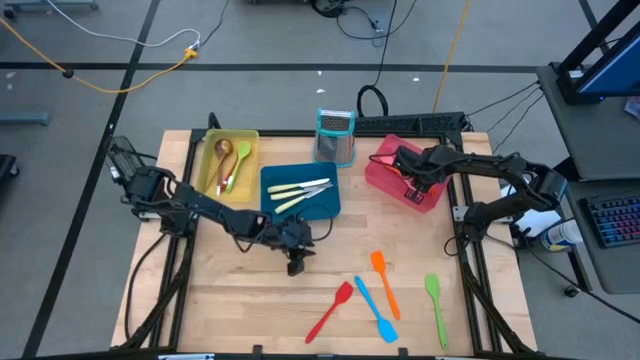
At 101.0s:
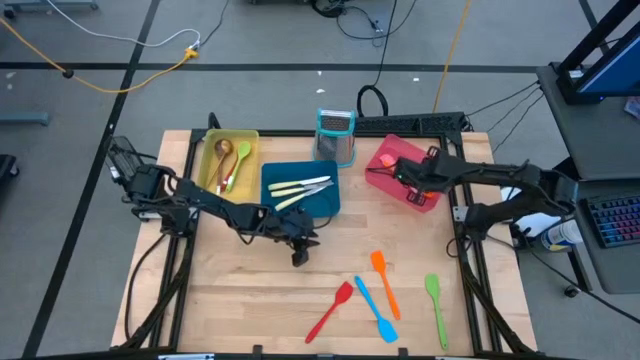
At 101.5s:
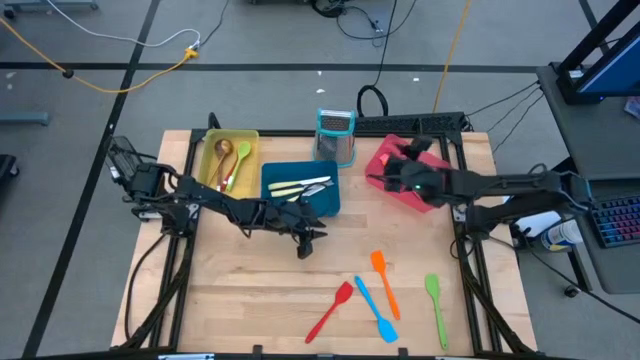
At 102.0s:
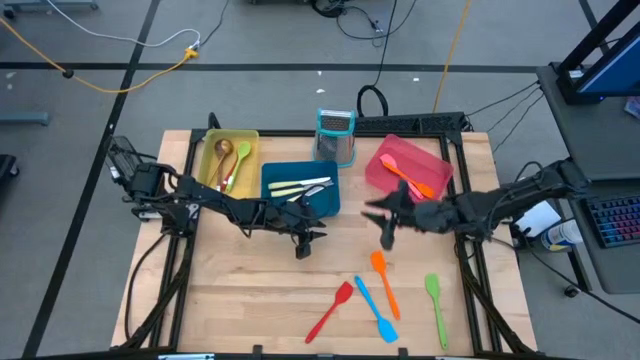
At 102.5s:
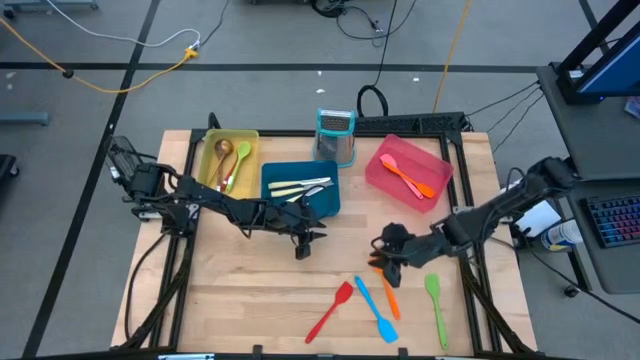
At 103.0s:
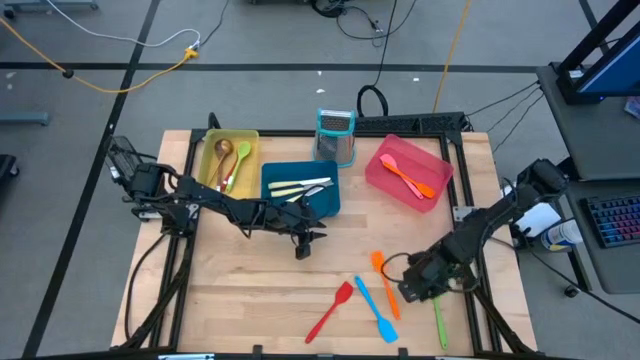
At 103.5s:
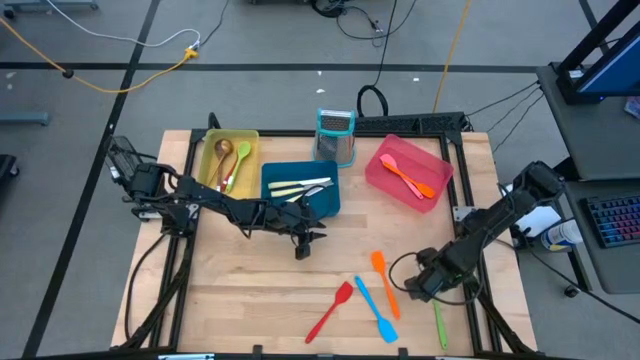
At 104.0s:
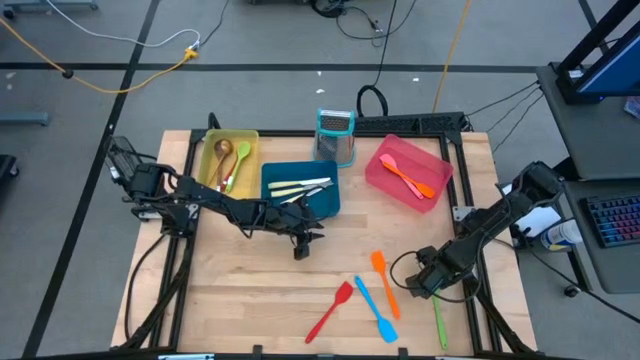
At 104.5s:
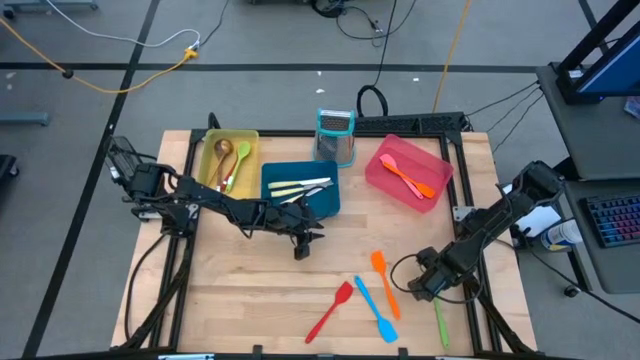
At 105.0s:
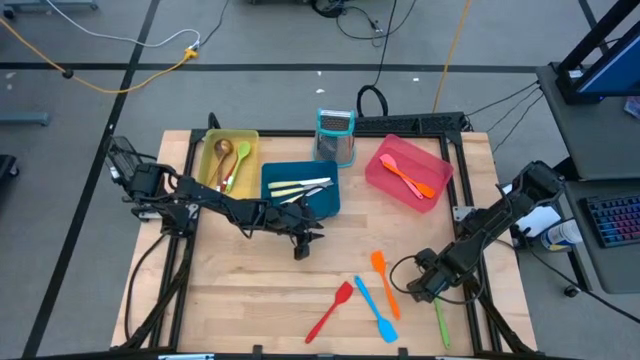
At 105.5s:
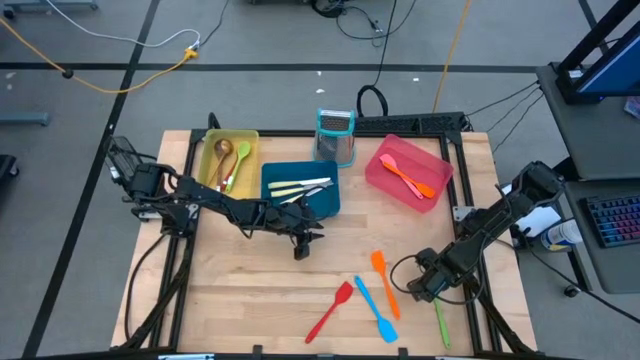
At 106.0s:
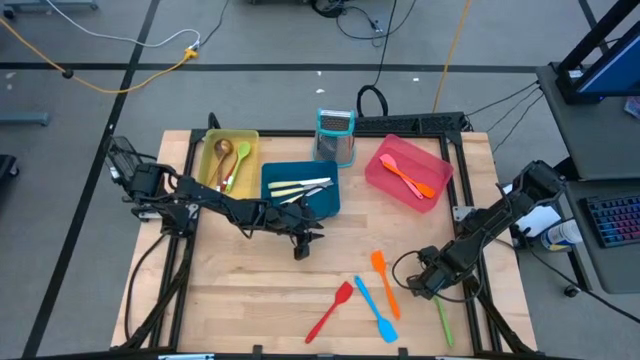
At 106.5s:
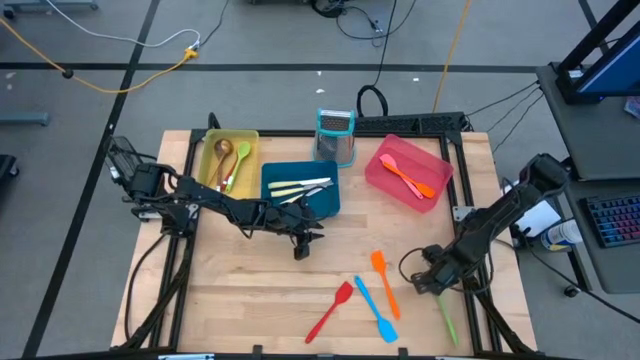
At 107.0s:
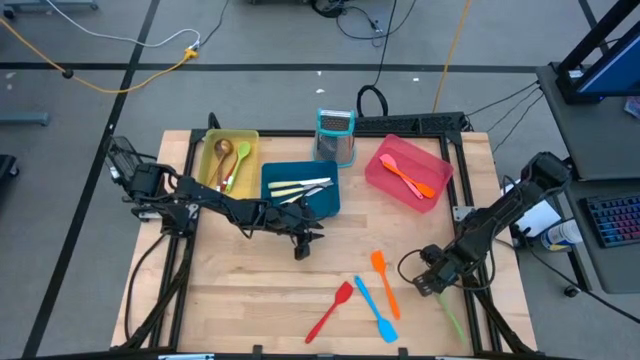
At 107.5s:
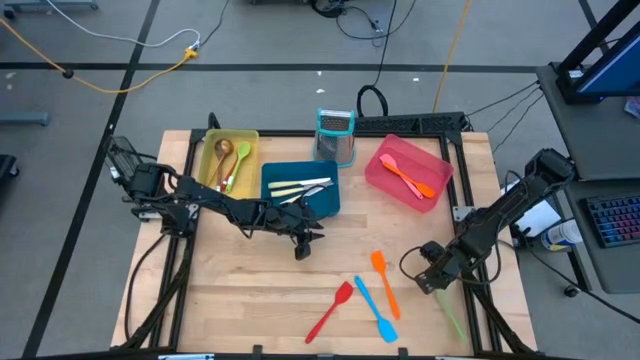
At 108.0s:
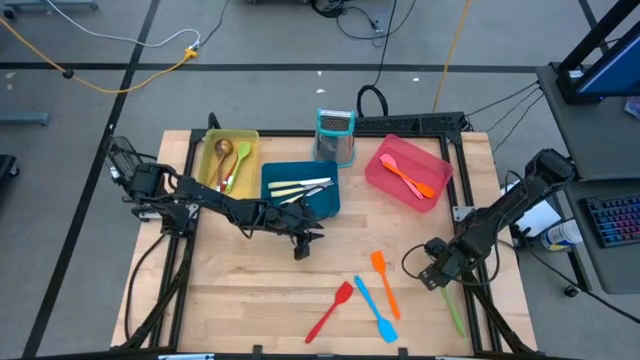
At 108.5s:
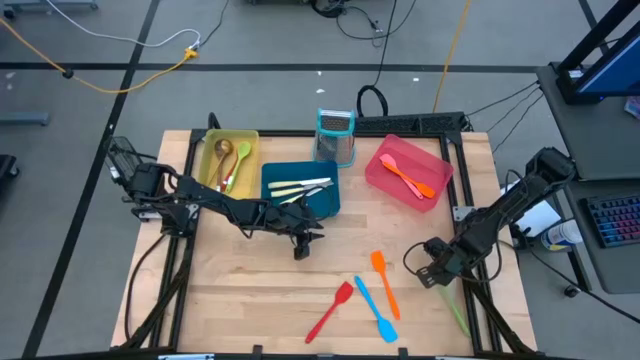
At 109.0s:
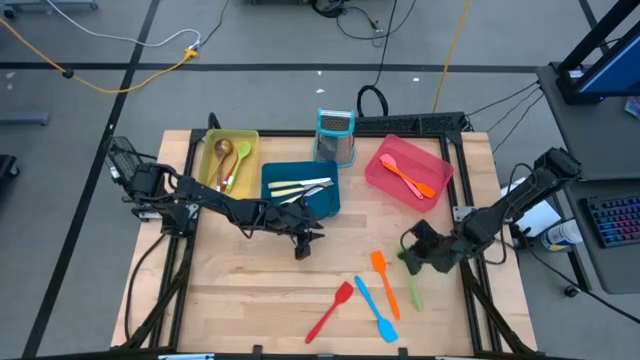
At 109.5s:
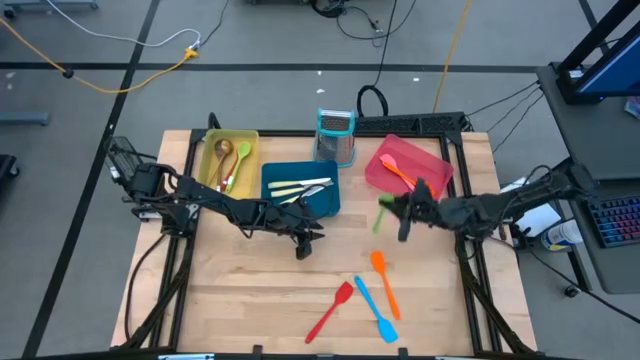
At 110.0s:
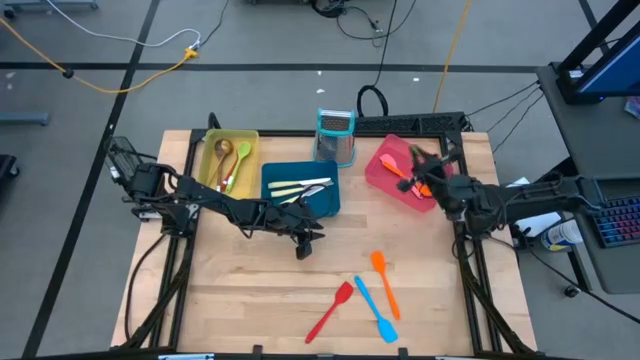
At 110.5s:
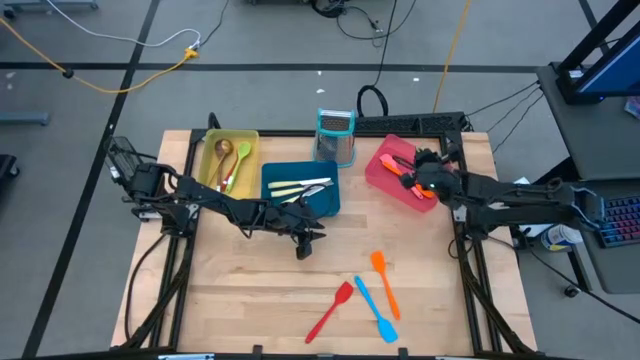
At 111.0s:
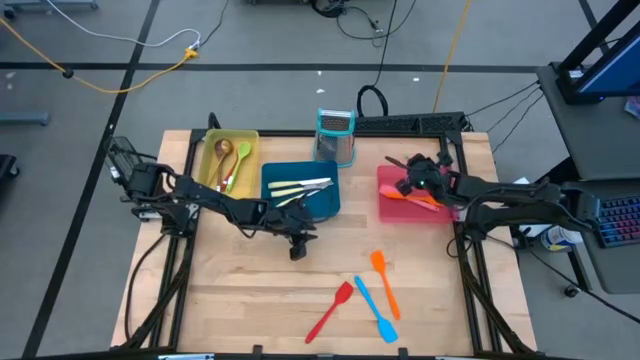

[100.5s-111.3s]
Task: Pick & Place Kitchen Items
Put the green spatula into the red bin

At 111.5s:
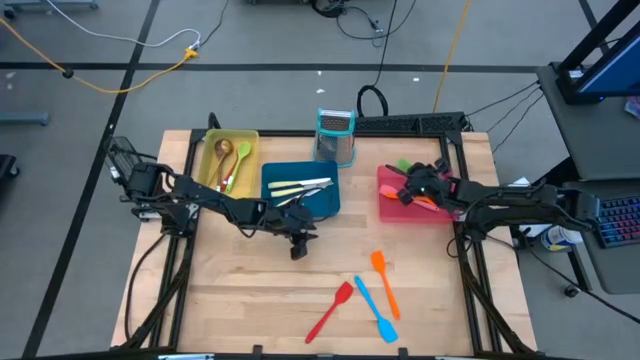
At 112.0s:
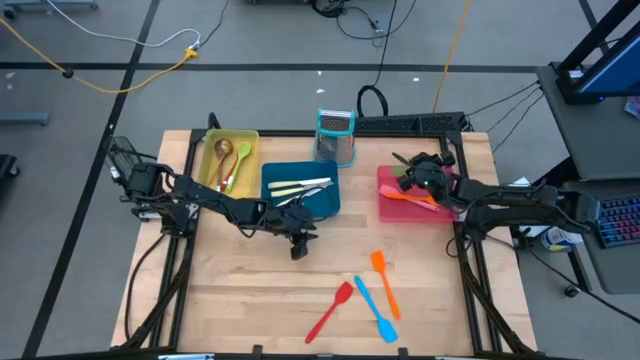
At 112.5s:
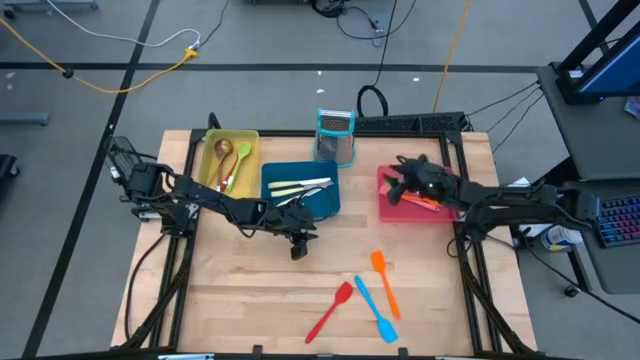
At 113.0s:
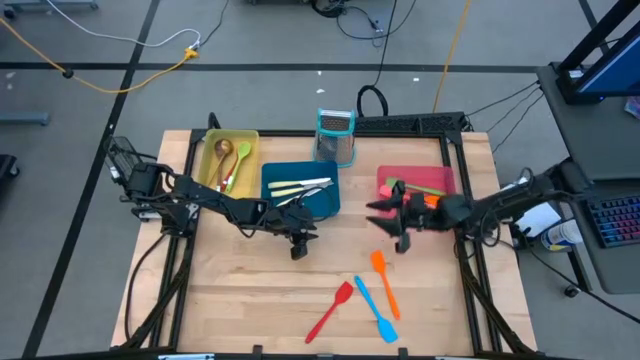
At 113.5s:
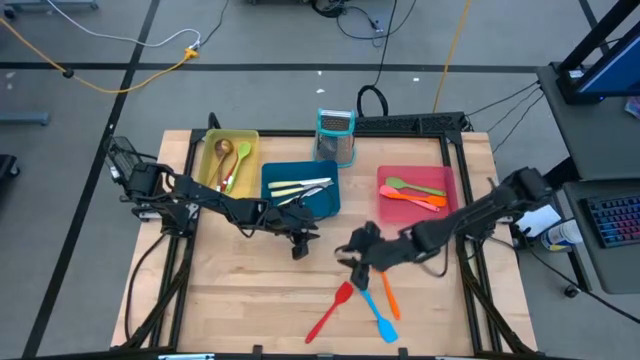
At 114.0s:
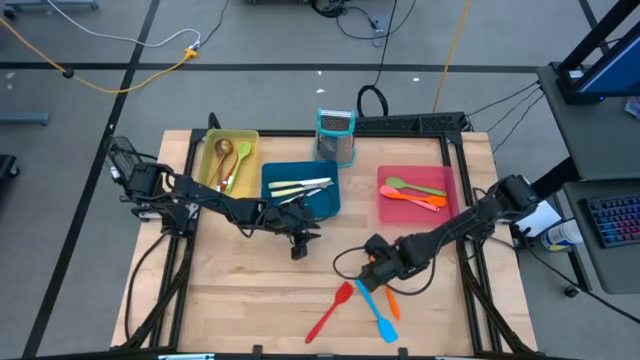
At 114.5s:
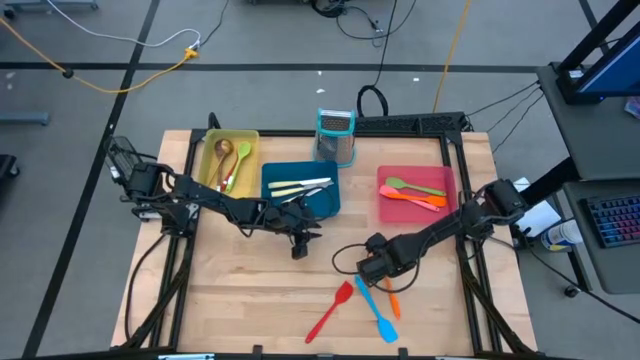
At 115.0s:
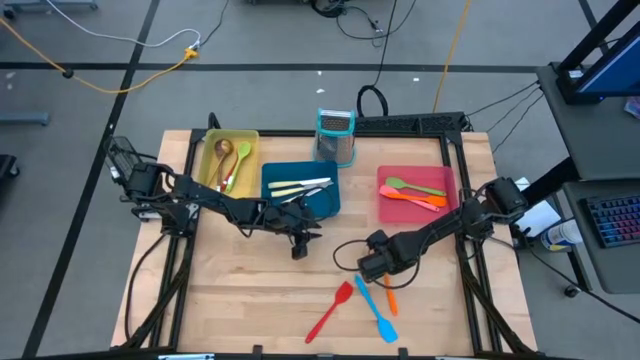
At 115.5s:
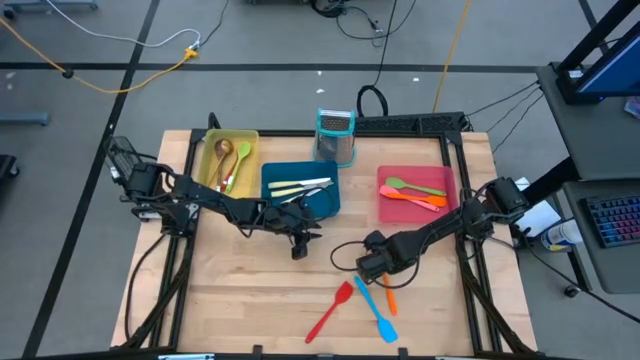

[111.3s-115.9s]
Put the orange spatula into the red bin

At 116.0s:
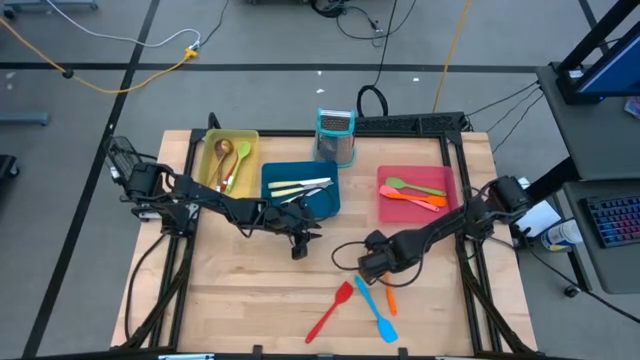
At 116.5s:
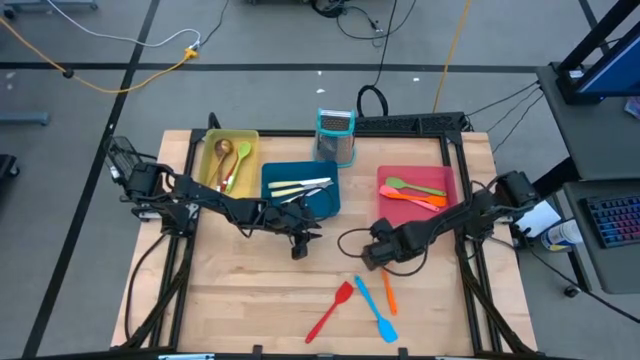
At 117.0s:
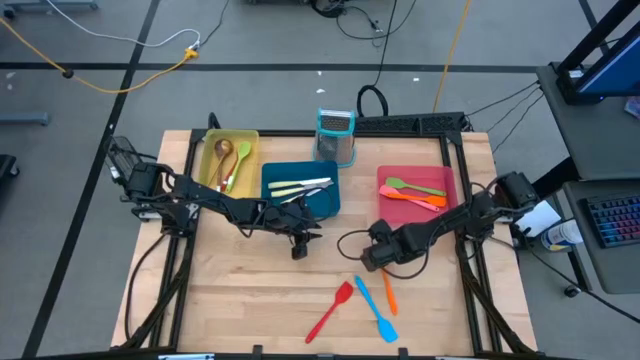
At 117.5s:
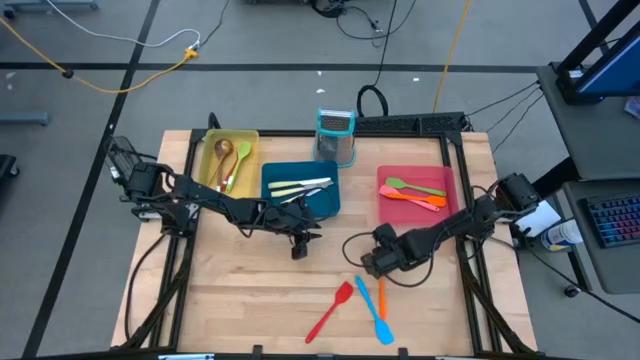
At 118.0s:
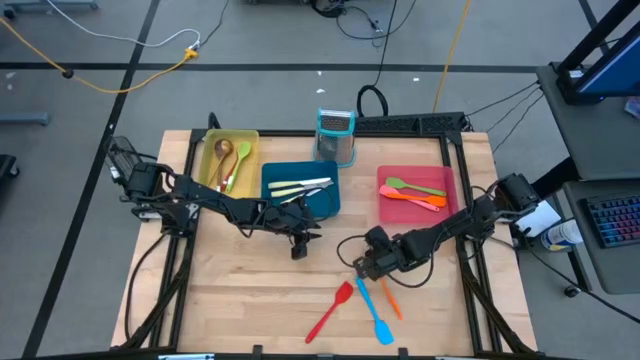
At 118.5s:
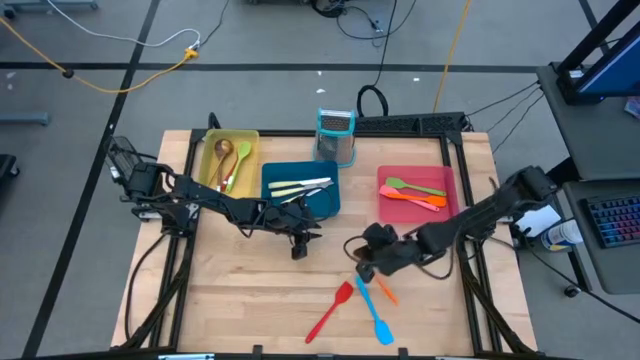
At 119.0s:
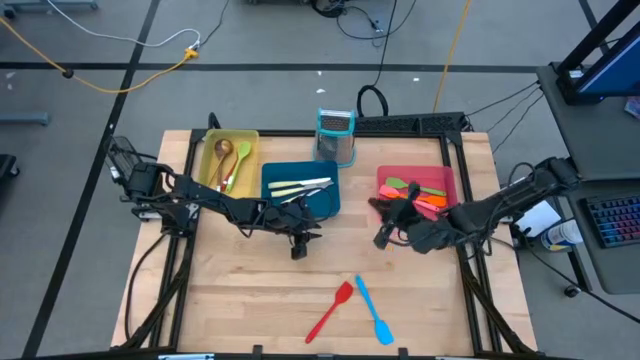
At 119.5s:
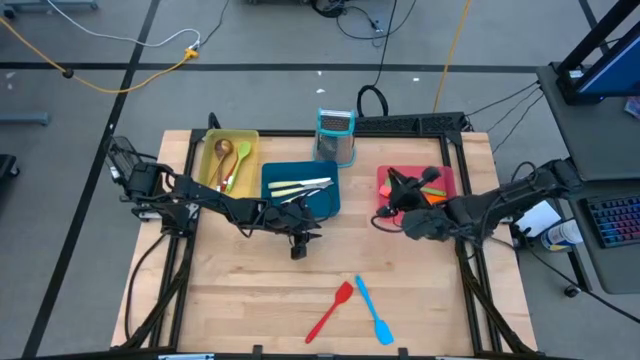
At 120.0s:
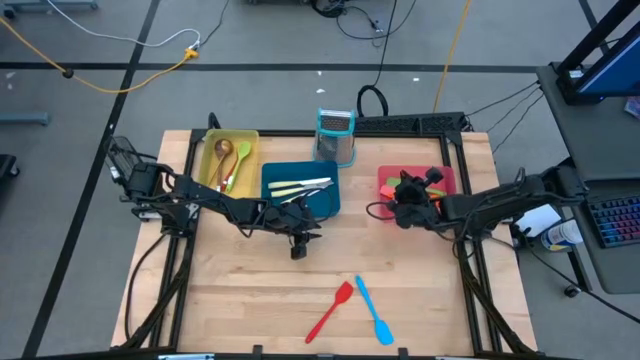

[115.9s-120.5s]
Put the orange spatula into the red bin
